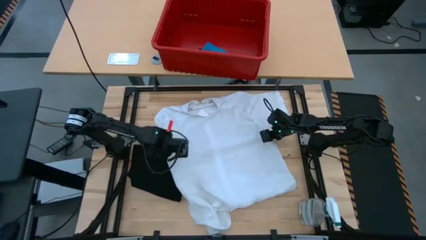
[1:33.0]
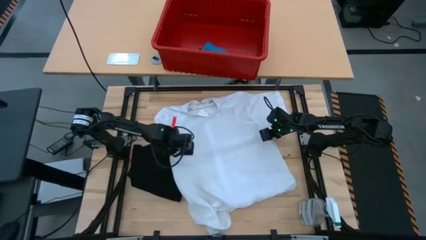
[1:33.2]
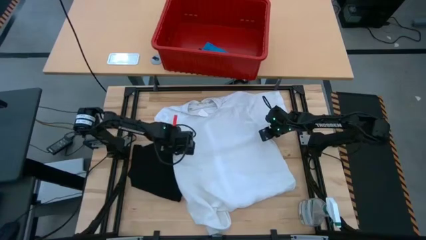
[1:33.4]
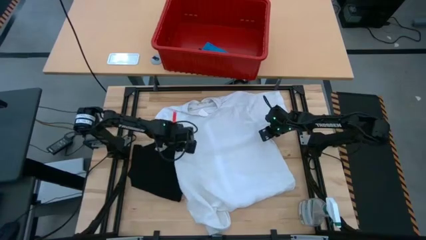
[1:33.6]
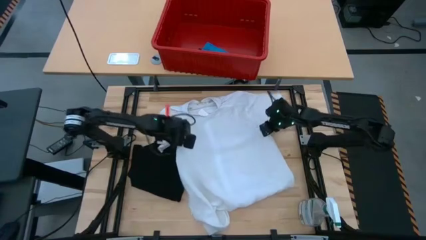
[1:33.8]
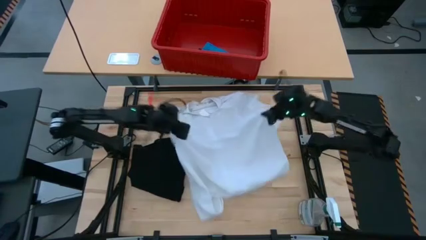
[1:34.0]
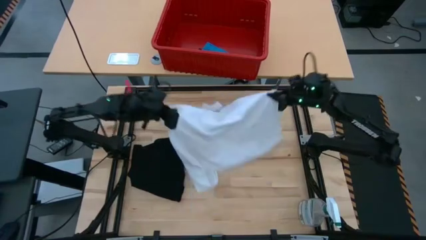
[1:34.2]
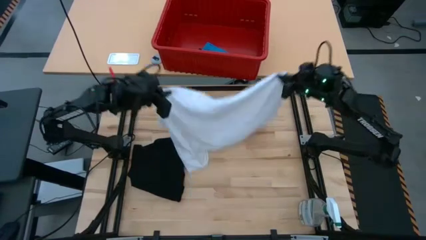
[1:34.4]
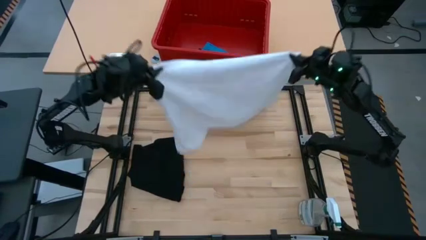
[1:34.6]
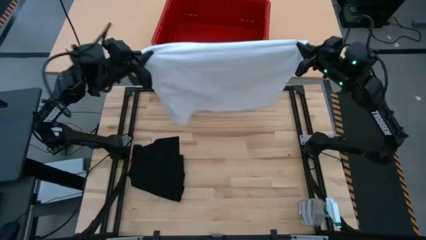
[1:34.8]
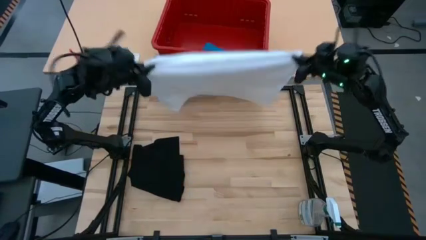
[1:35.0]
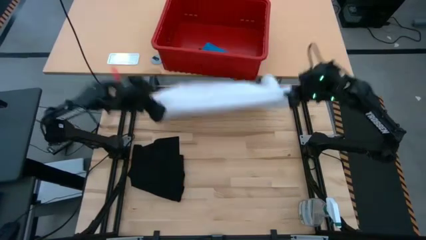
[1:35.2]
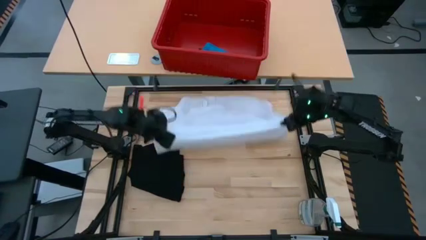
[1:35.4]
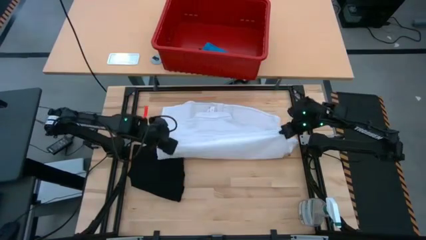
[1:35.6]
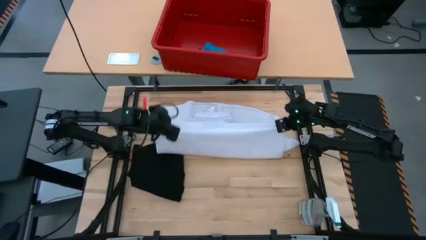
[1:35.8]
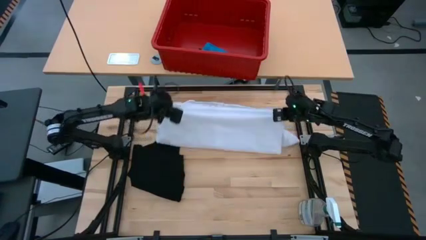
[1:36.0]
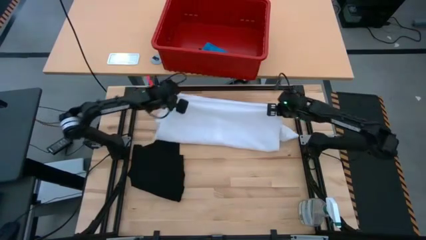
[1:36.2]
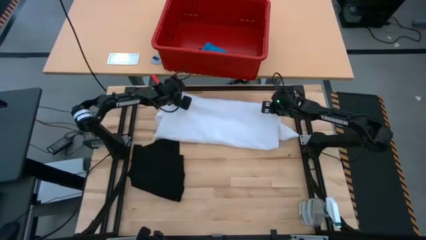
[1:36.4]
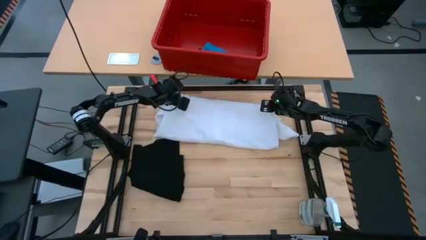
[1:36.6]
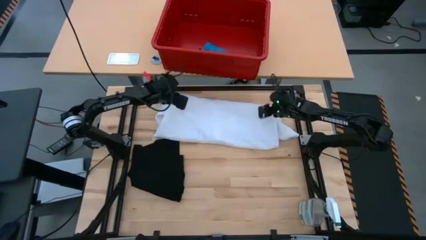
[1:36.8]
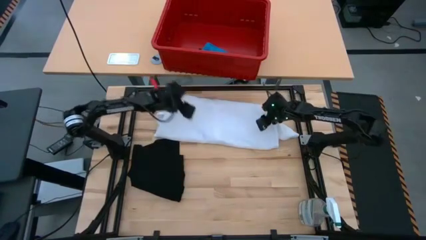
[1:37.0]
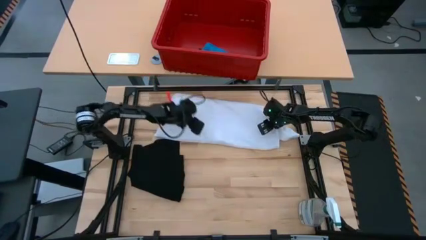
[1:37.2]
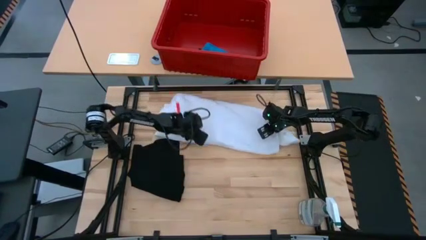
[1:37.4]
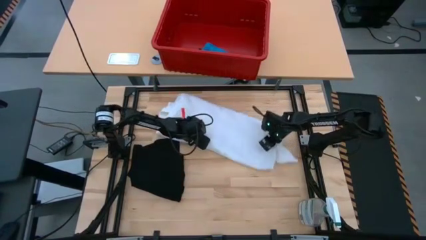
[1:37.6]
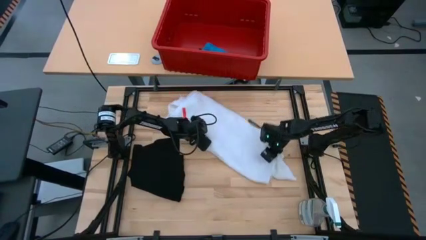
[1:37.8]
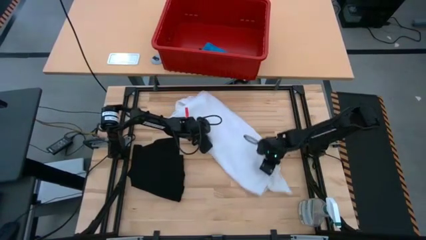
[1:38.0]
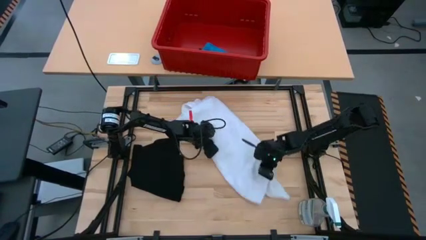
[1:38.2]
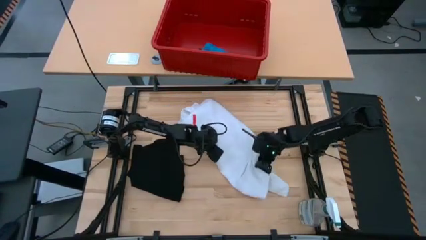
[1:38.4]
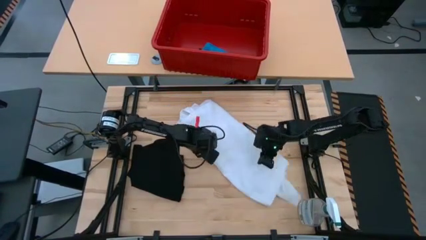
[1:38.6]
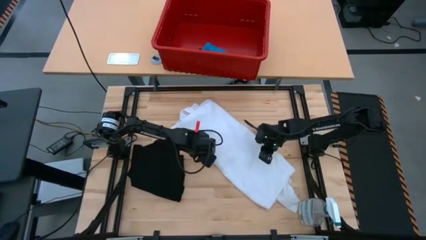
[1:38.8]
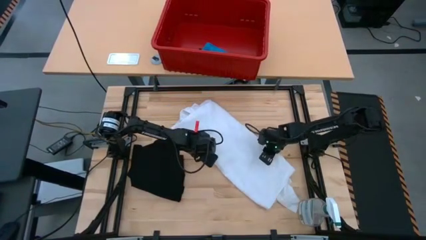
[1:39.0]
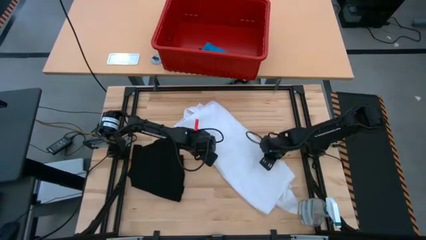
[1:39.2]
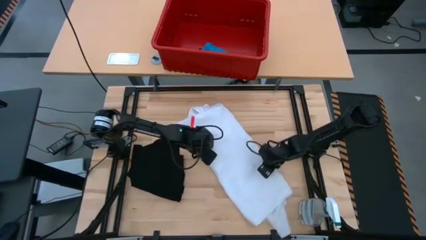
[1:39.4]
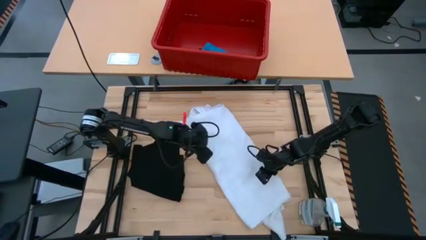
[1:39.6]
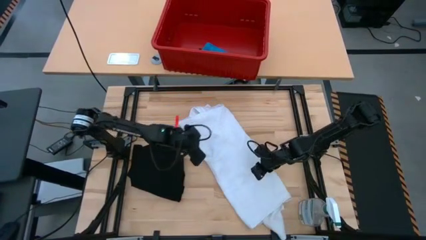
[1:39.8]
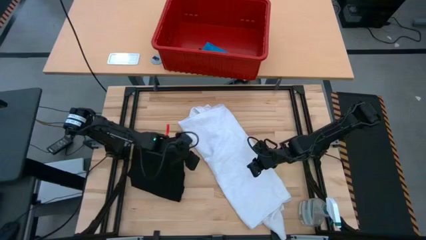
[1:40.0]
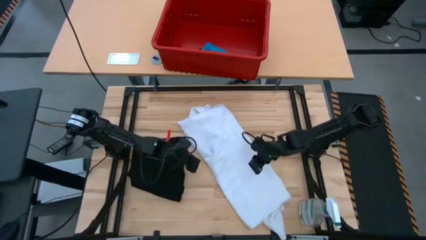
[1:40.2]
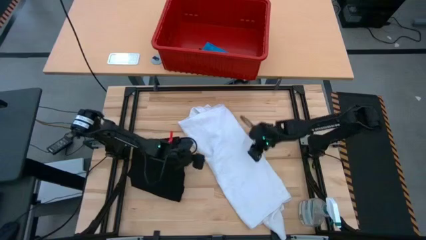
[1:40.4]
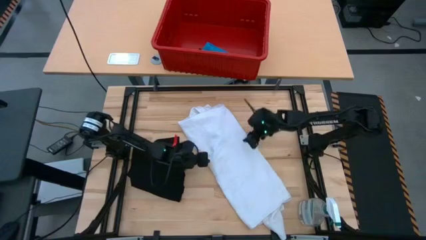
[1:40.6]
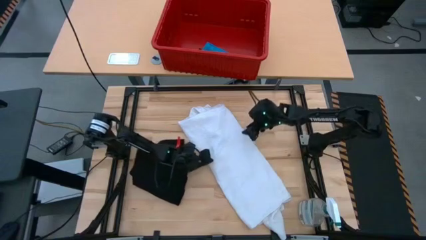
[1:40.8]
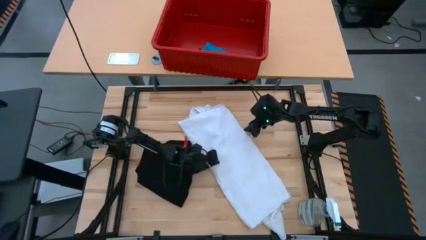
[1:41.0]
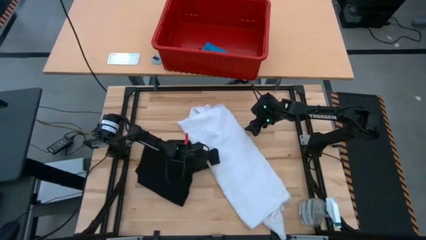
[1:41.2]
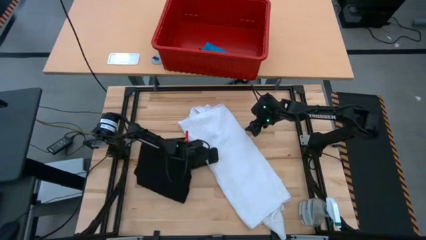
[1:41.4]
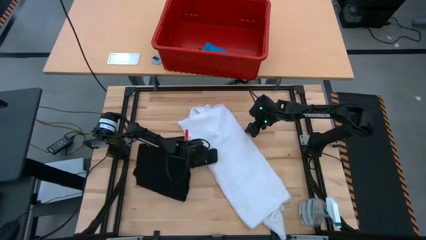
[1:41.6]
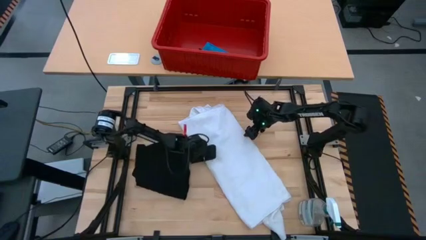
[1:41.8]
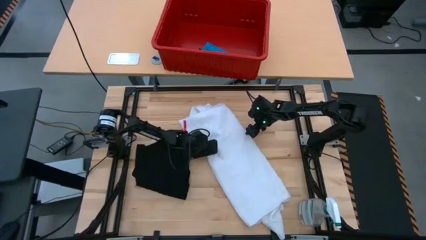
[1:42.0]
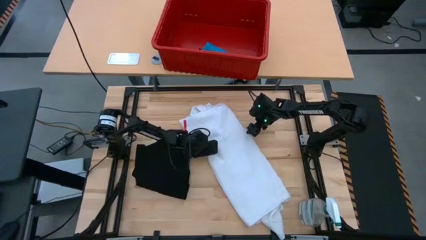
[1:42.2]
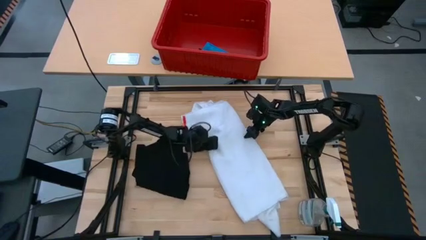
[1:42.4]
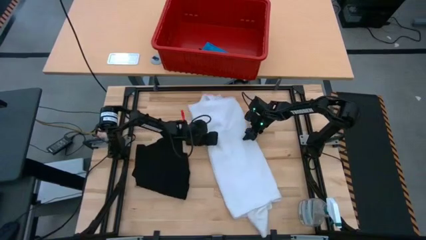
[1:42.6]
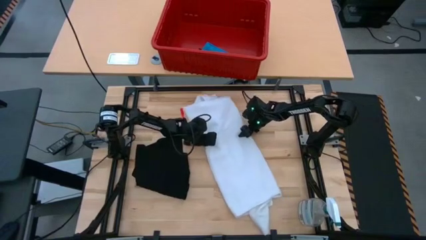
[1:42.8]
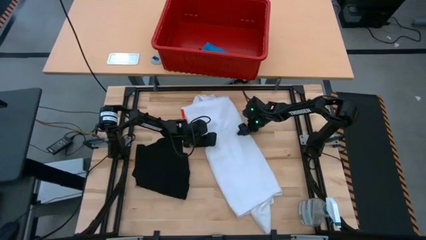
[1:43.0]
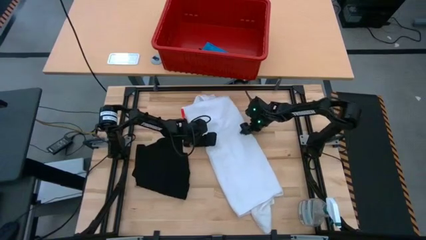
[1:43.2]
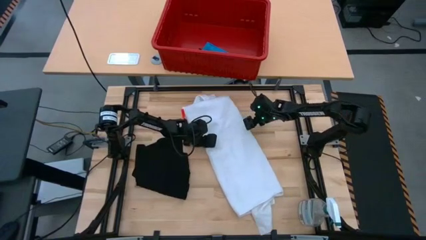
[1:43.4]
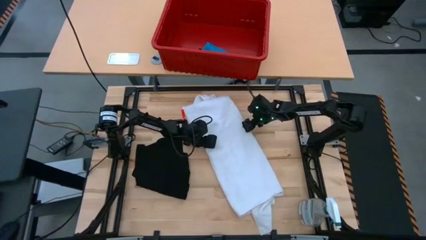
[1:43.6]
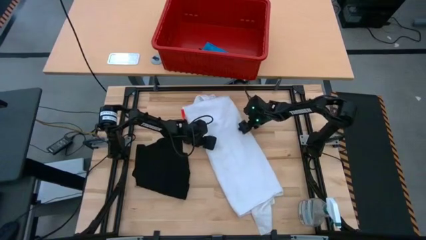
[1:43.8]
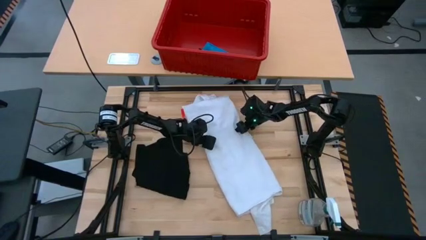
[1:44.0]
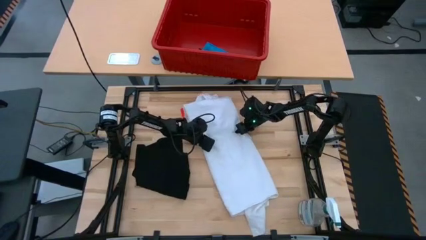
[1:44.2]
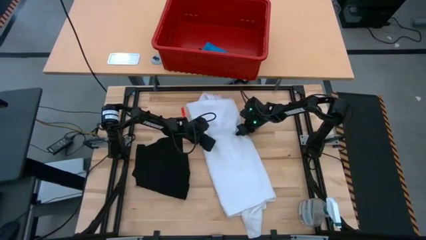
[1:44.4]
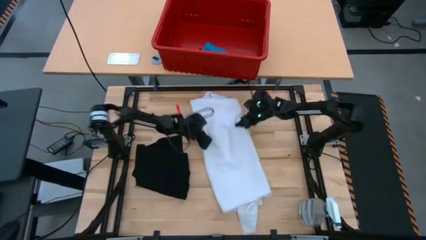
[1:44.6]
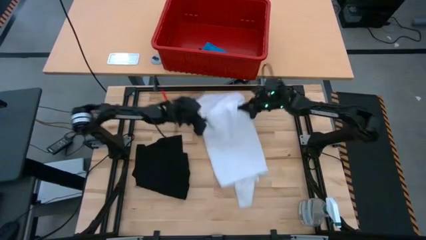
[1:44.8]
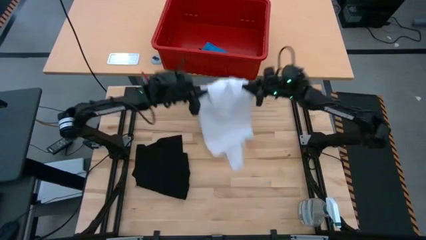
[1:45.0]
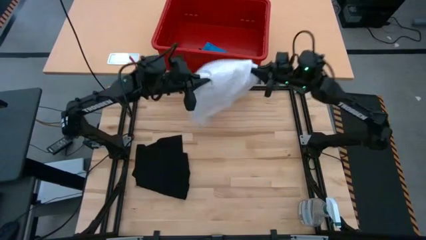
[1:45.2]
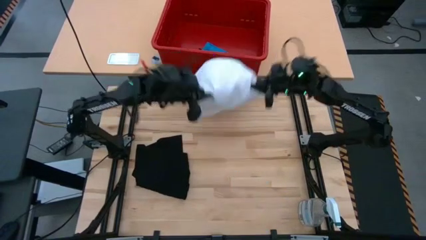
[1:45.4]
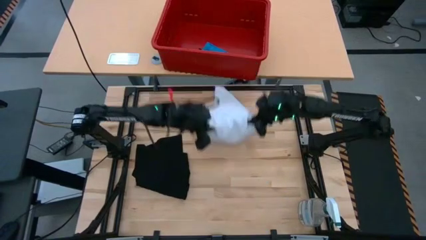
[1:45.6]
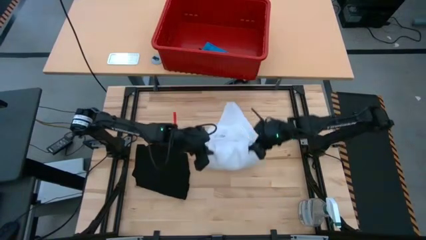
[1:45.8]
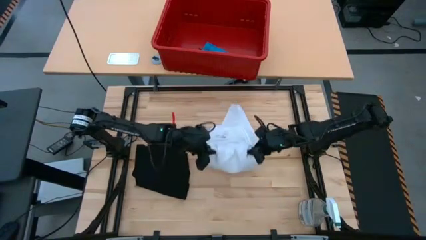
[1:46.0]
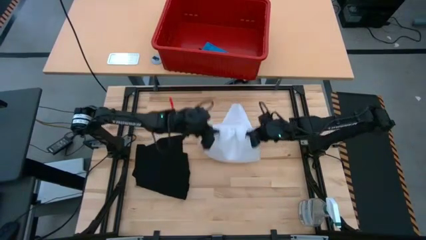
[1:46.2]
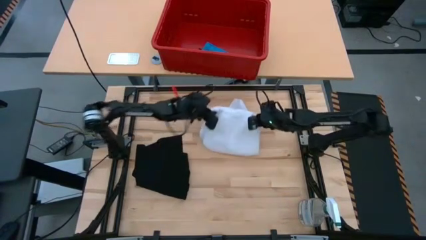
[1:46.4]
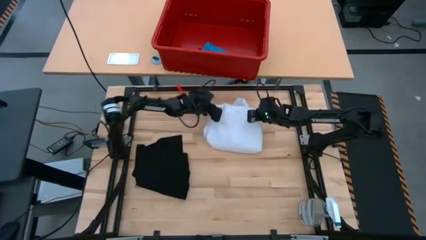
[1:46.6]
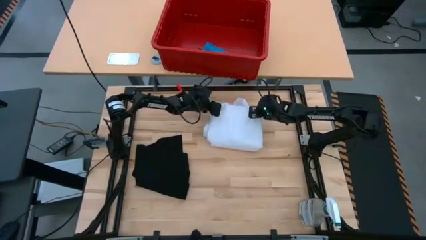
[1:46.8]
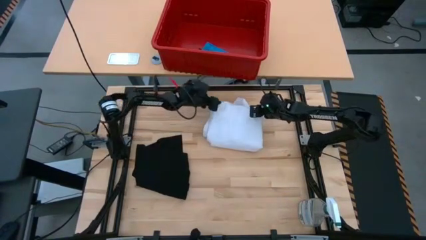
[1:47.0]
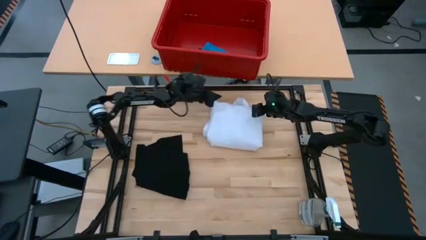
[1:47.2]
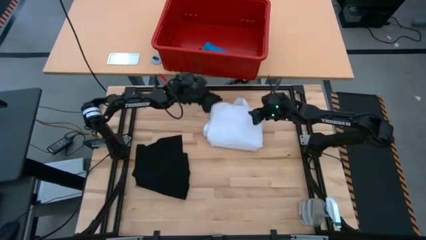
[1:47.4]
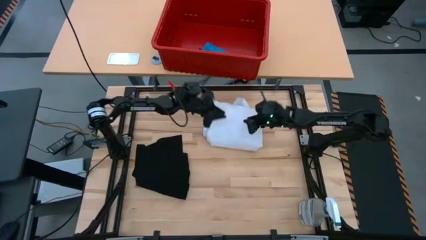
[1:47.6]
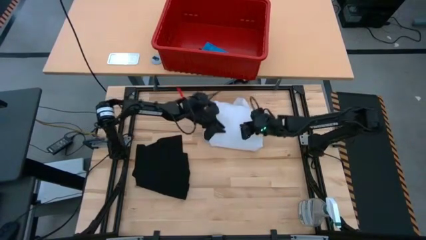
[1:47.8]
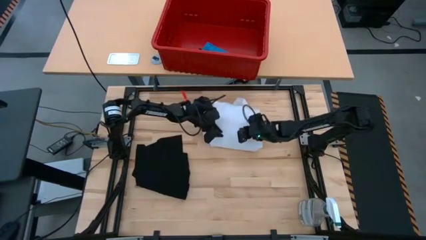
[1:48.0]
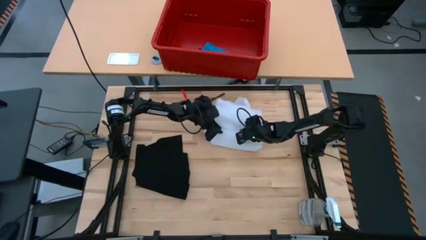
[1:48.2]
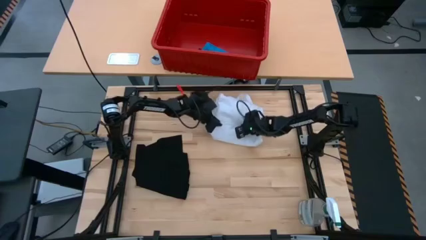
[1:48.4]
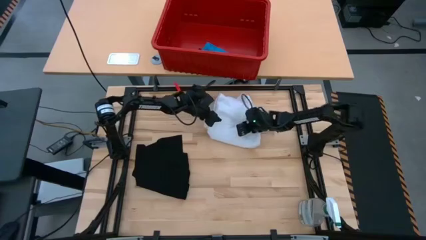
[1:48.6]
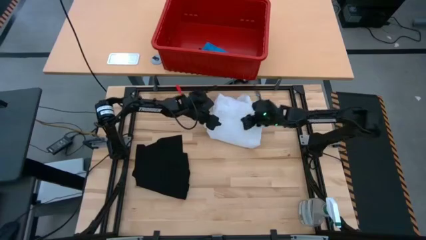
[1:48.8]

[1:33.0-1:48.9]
Task: Fold laundry
Fold the white shirt

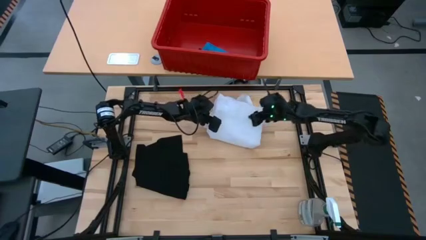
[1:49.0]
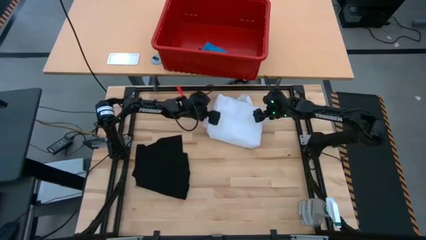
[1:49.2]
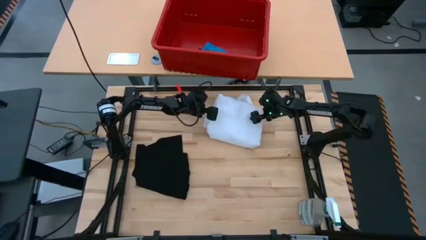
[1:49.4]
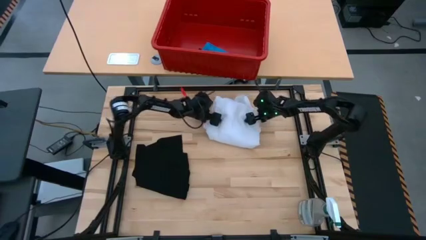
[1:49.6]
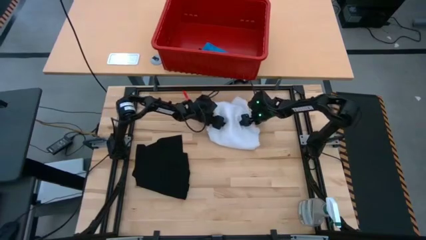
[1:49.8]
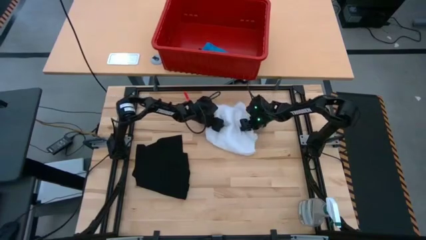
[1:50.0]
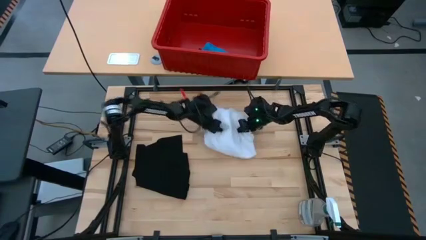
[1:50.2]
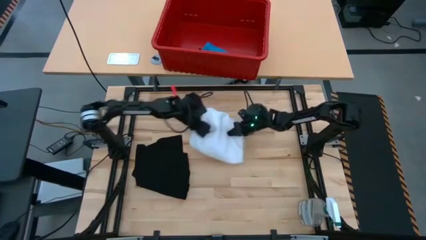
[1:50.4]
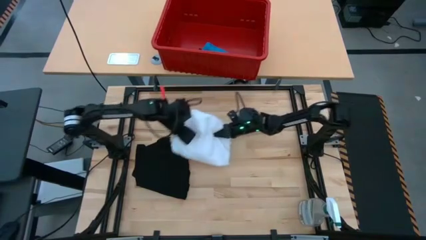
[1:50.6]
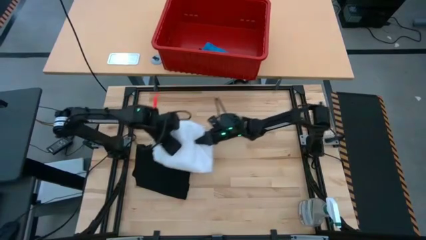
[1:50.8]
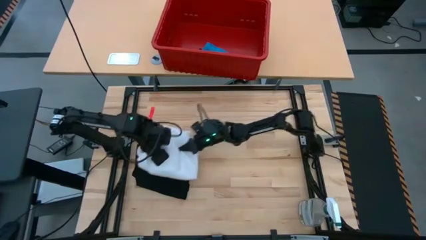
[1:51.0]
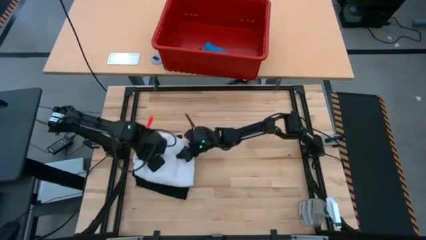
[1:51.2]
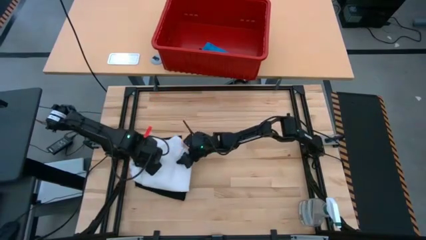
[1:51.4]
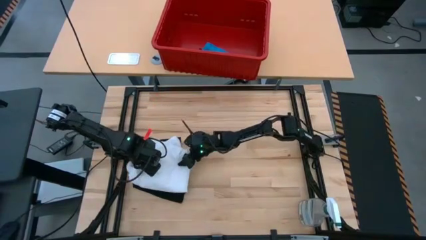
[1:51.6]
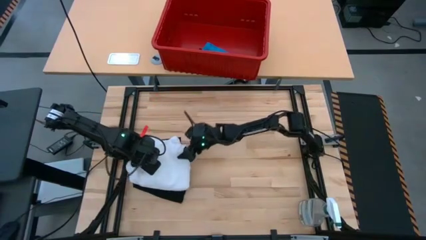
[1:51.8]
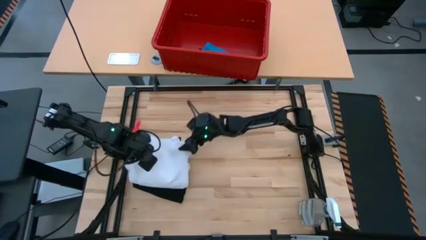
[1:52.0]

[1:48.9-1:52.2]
Put the folded white shirt on the black shirt
